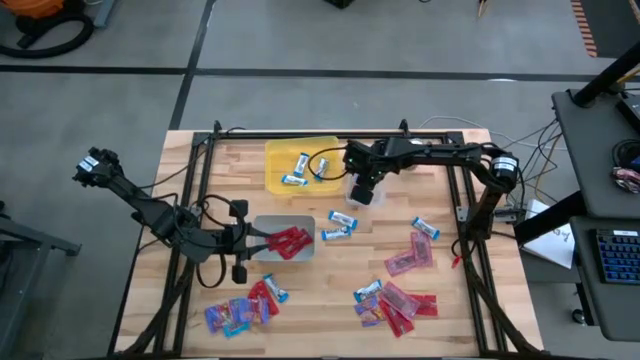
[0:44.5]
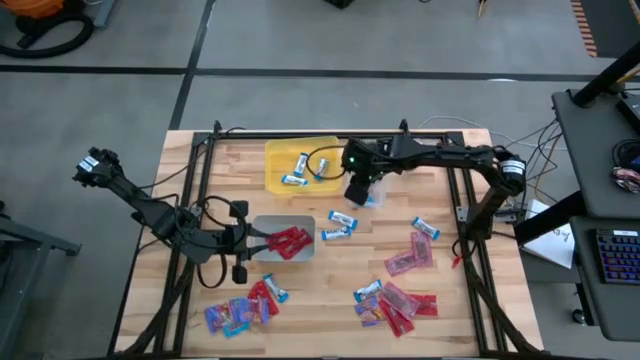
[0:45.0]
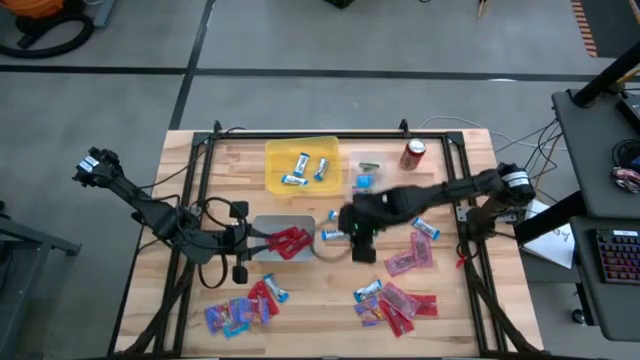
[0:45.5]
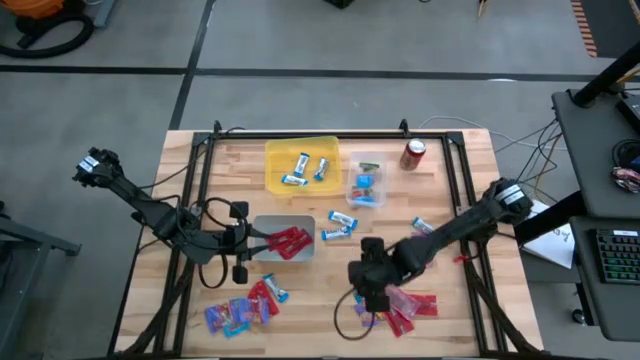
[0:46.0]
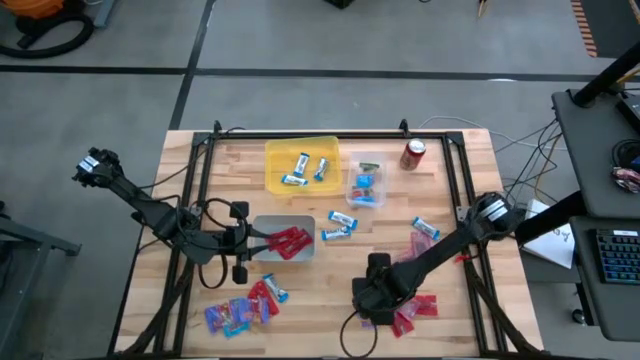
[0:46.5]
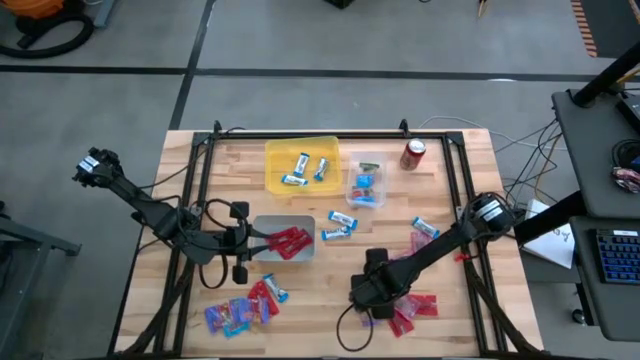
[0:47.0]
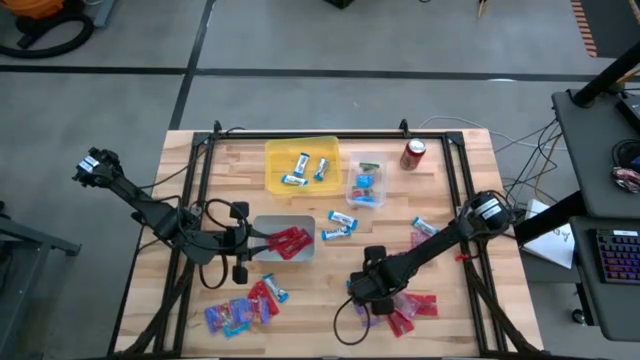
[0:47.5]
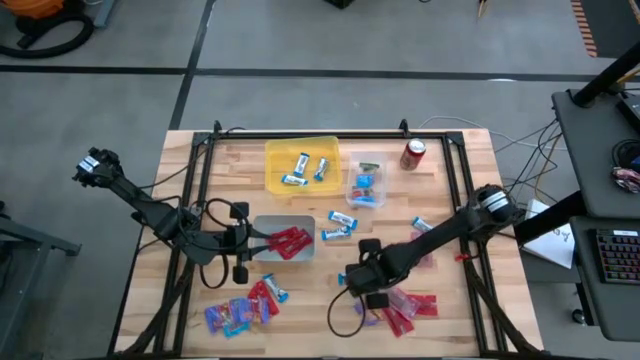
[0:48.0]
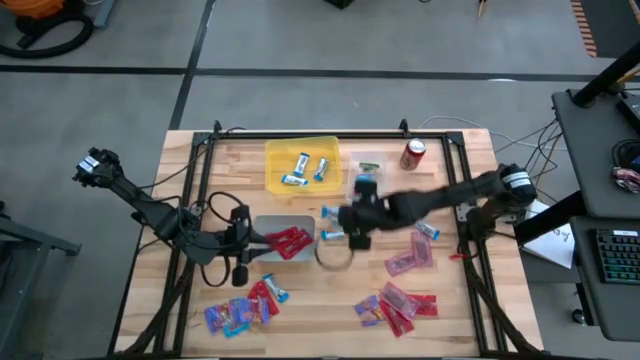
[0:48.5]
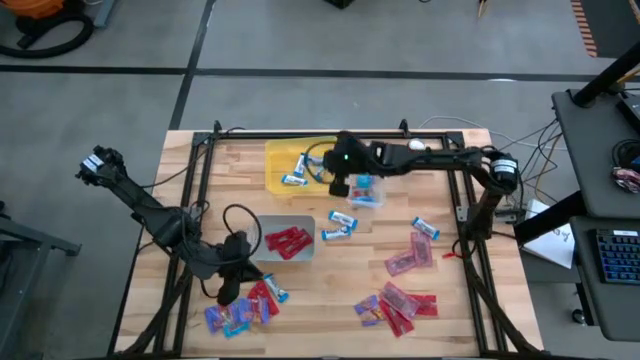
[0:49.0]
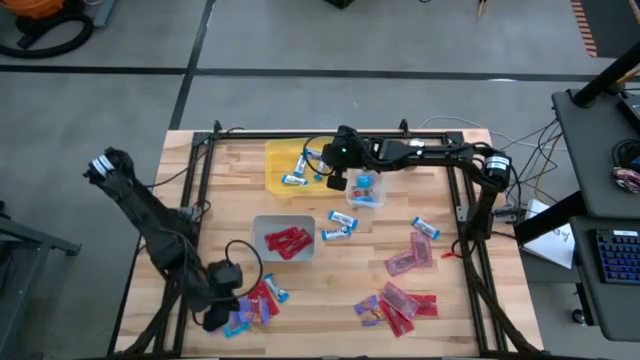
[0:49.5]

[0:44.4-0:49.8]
Task: Sort candy
Put the white candy into the yellow bin

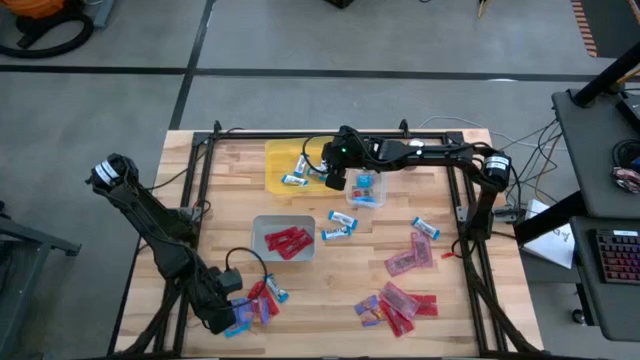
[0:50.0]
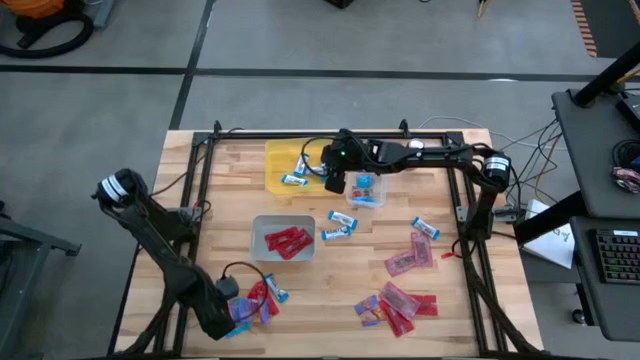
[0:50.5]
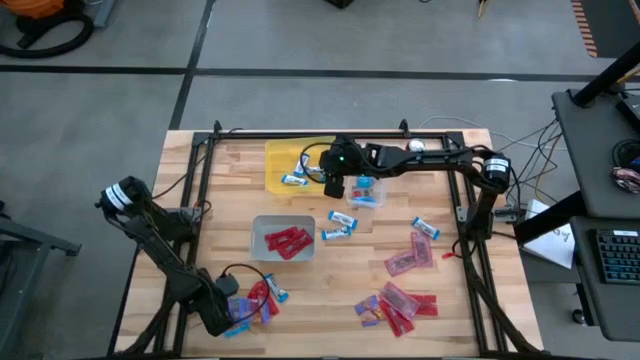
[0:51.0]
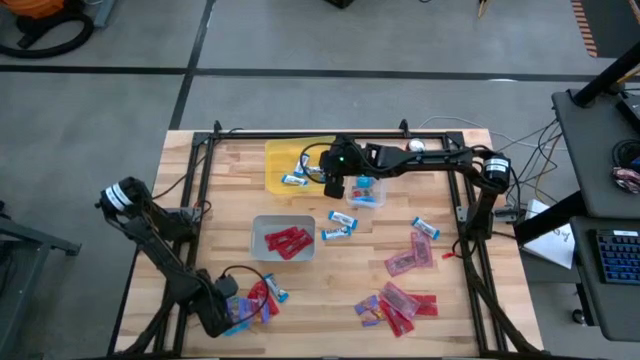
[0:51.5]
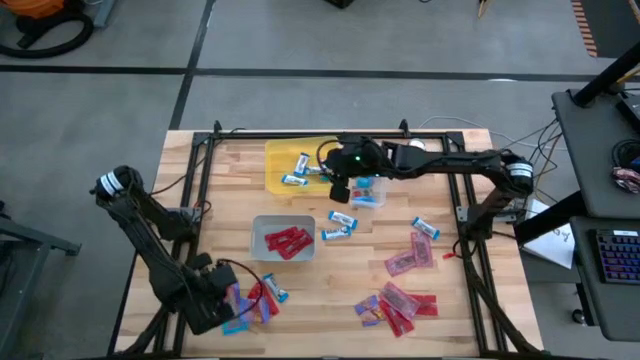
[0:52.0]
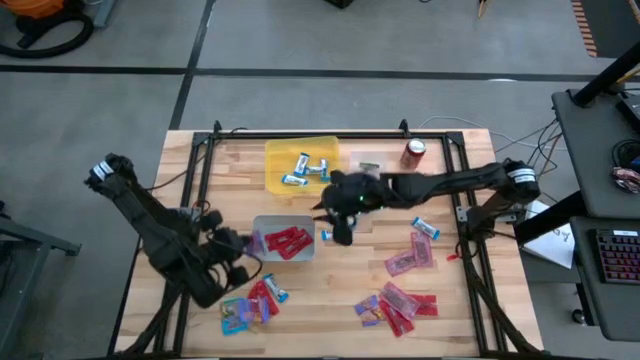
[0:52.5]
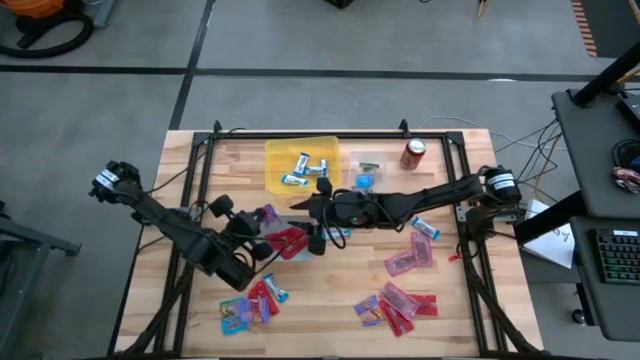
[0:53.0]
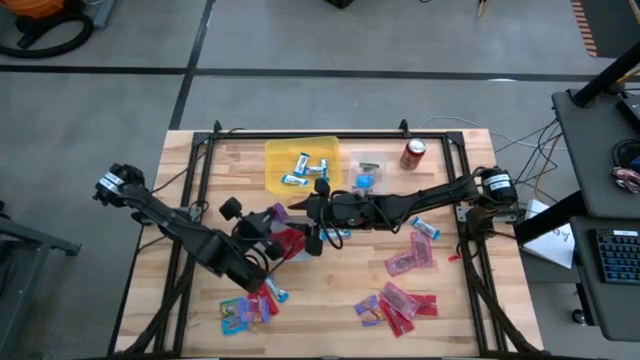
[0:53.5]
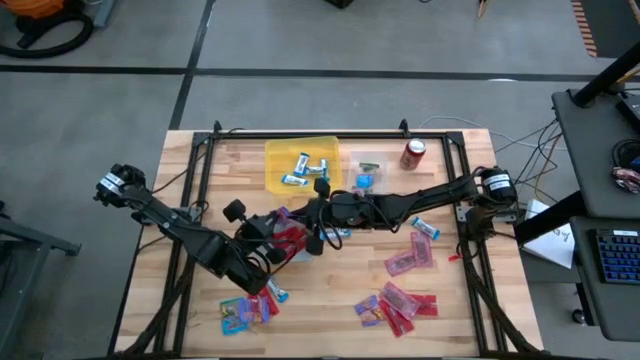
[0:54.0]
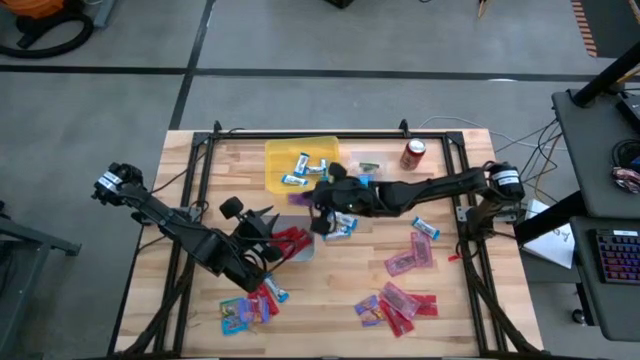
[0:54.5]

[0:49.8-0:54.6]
Put the blue candy into the transparent bin

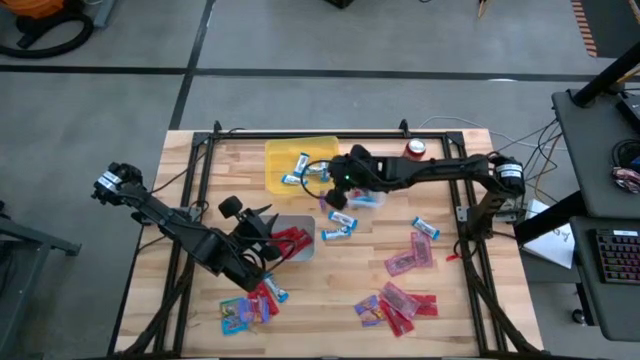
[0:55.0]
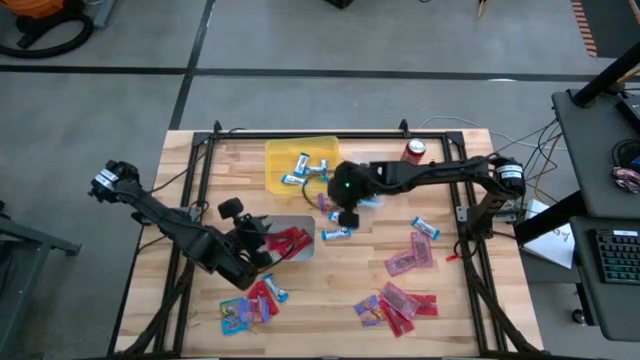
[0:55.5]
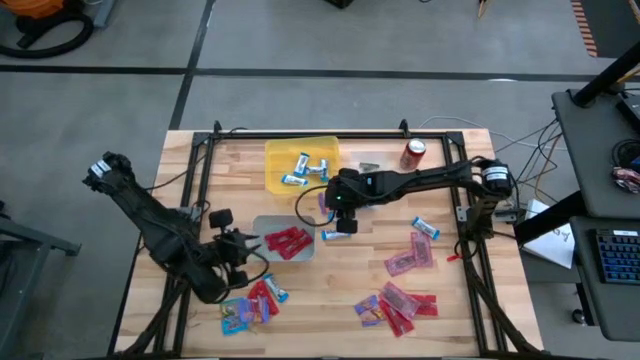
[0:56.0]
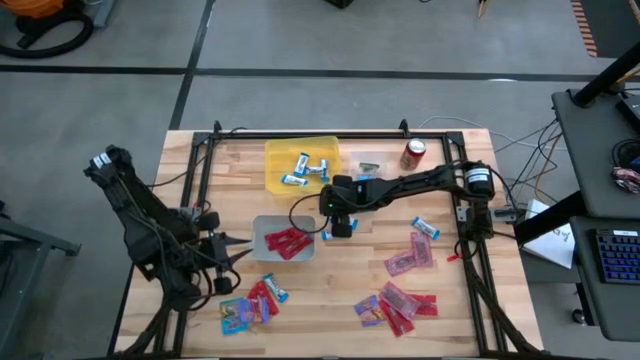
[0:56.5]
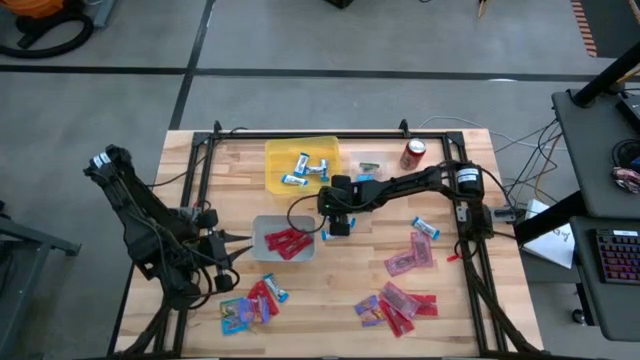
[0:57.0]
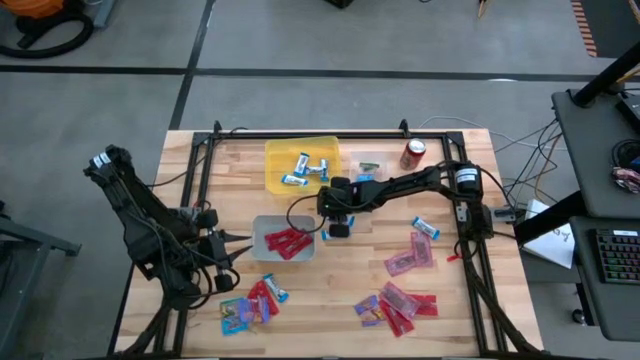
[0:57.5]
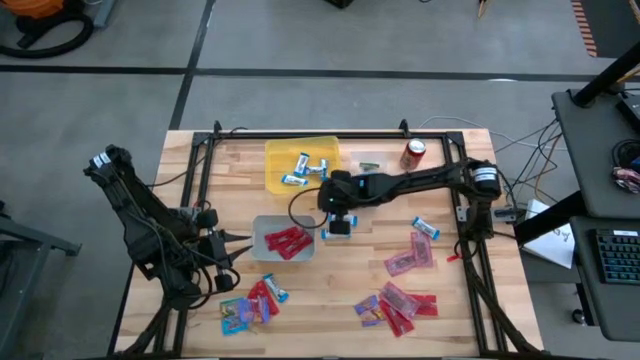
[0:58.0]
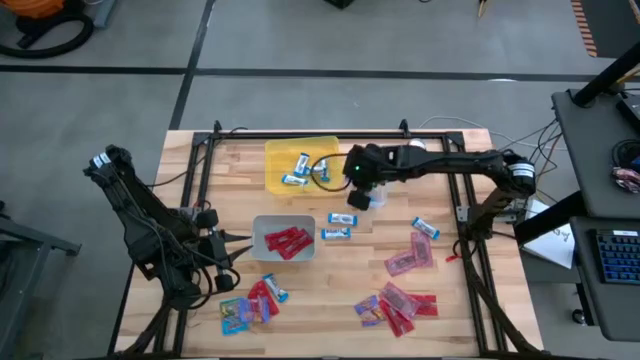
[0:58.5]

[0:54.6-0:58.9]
Put the blue candy into the transparent bin

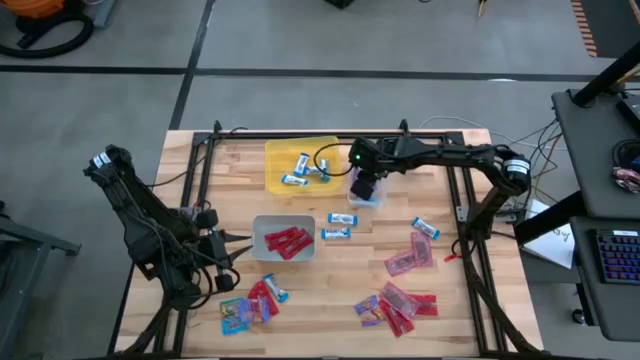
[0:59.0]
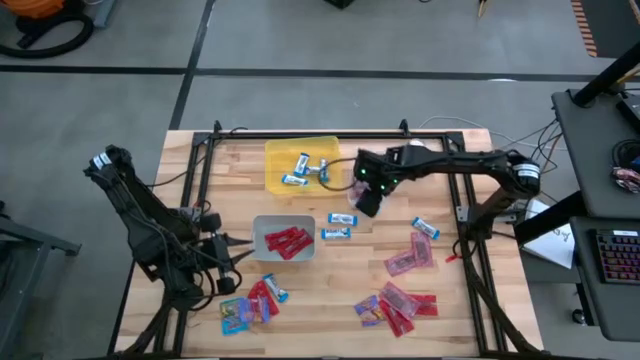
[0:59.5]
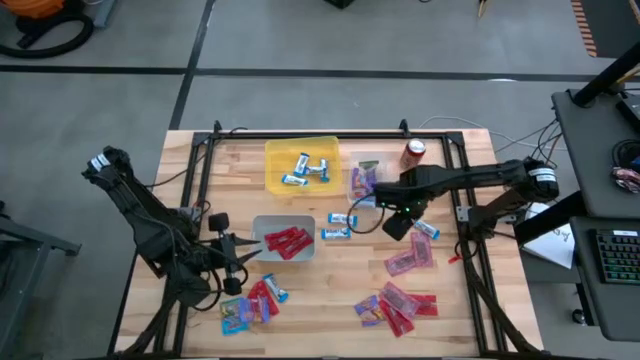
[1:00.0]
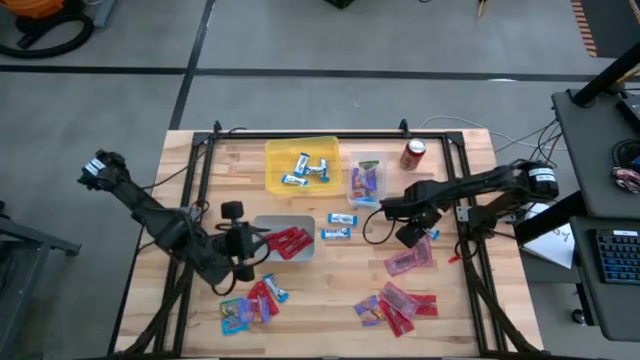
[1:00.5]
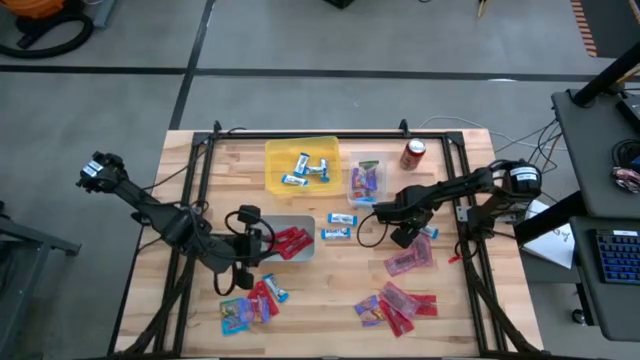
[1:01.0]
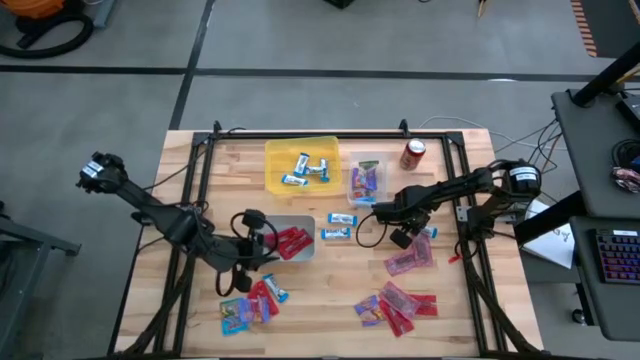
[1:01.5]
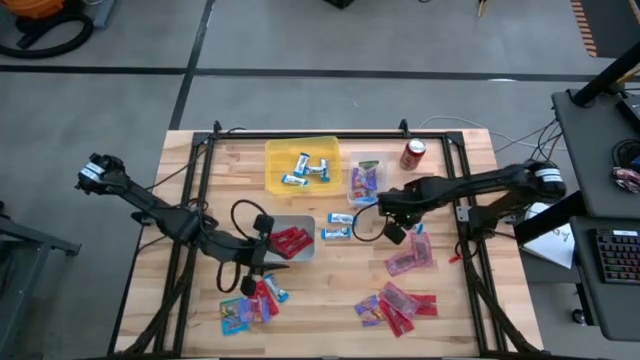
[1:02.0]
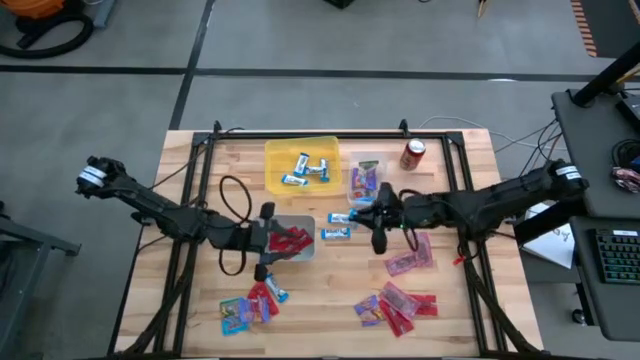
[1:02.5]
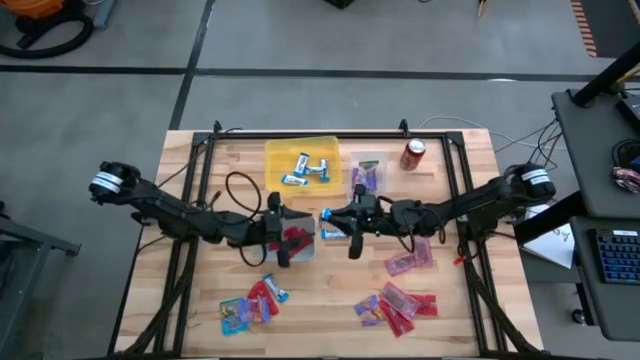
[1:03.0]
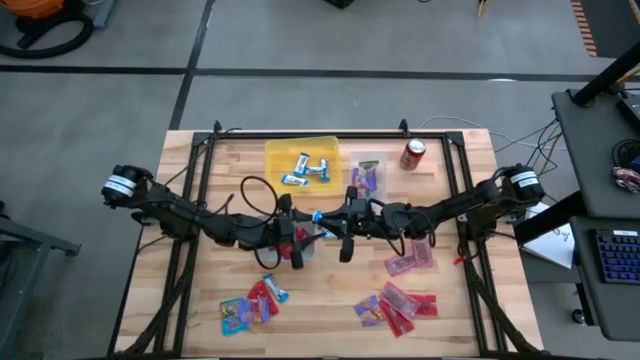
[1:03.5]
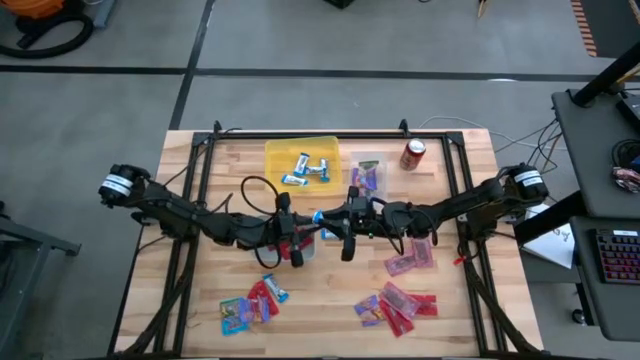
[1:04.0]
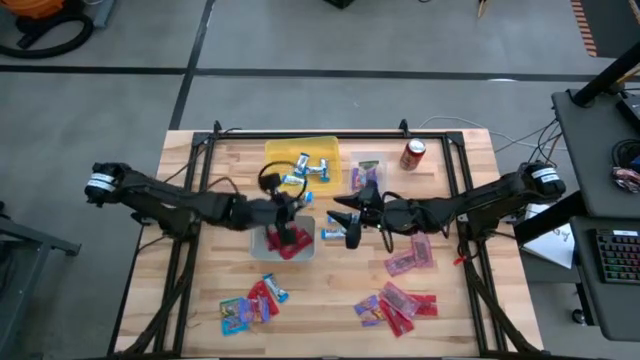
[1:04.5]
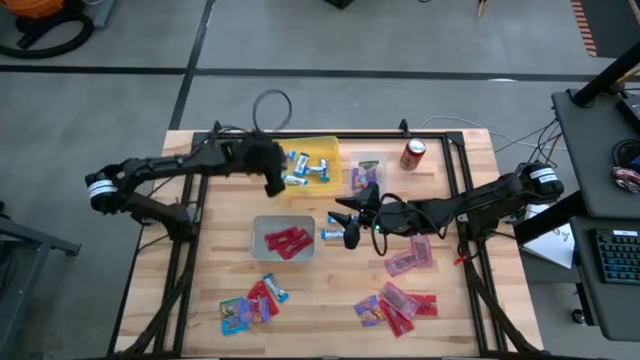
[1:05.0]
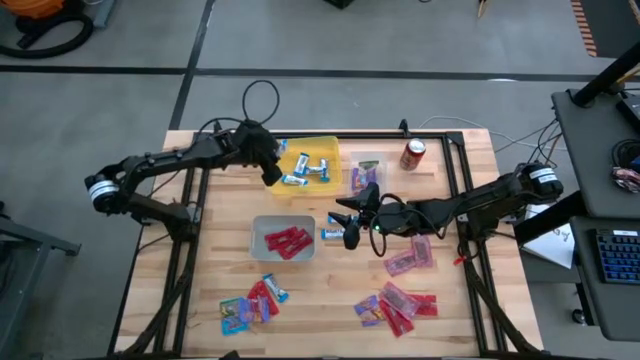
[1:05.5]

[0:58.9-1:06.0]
Put the white candy into the yellow bin
